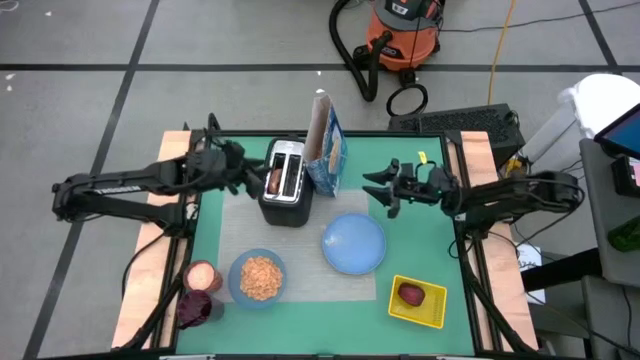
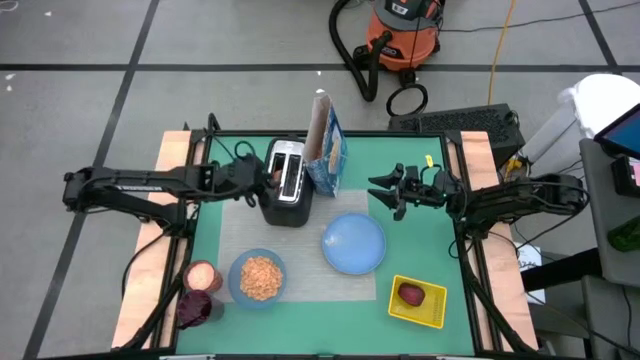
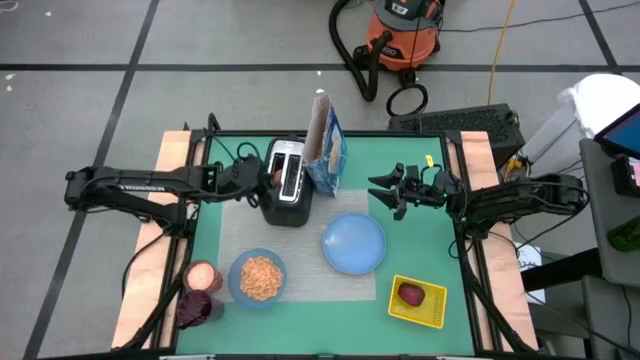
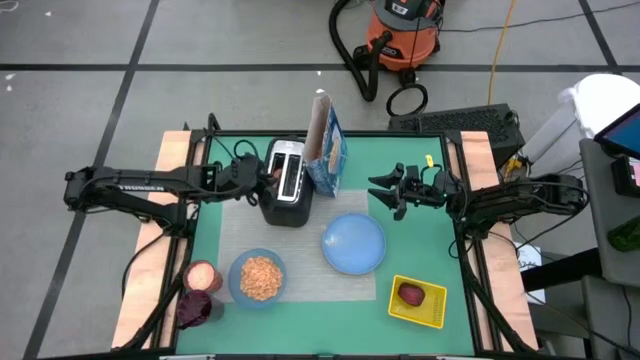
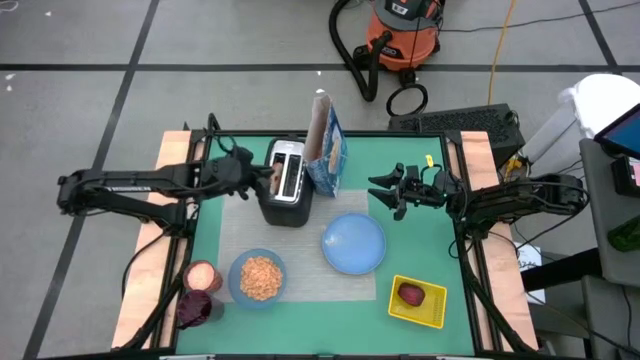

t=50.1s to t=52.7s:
Task: Arrange a breakfast setting
Put the toasted bagel on the blue plate

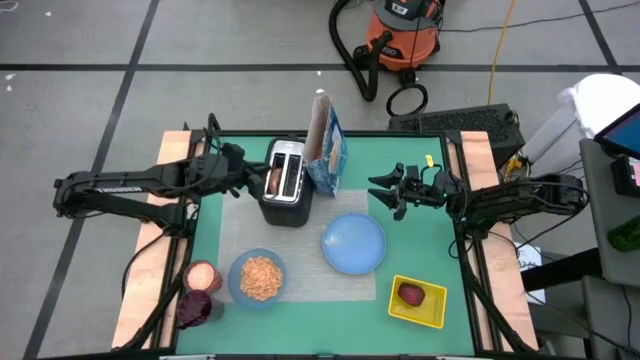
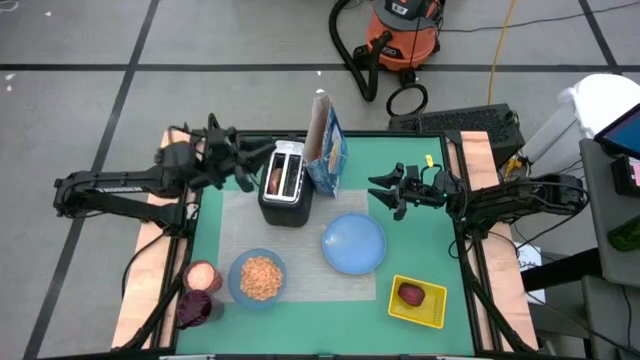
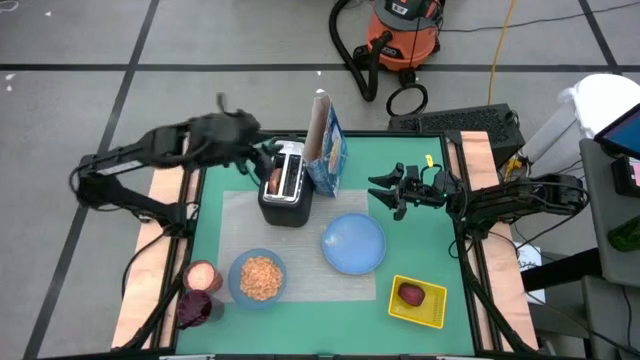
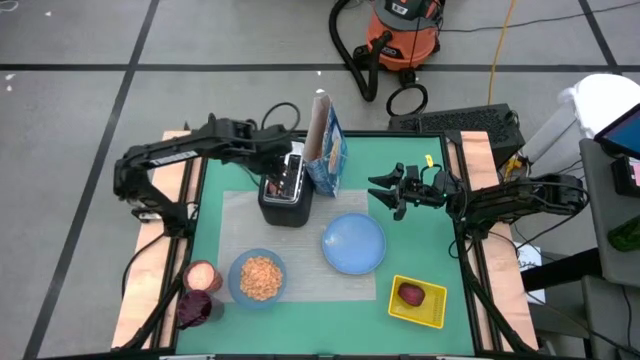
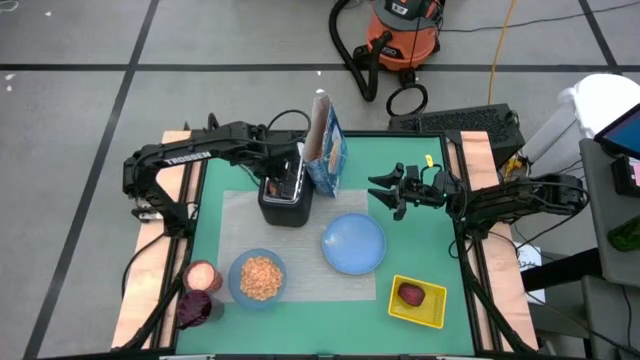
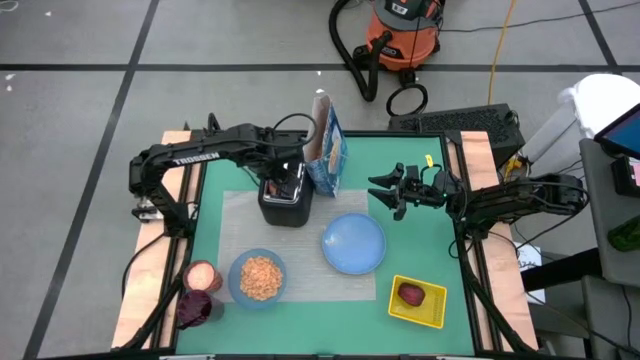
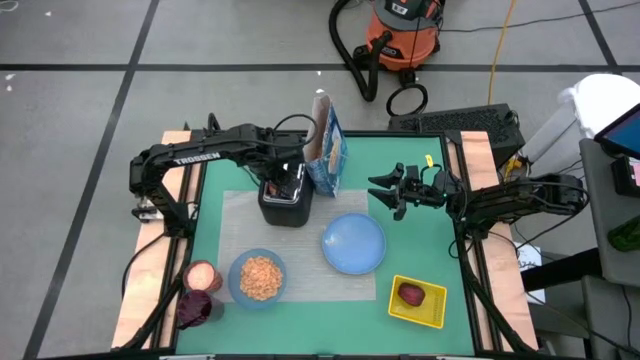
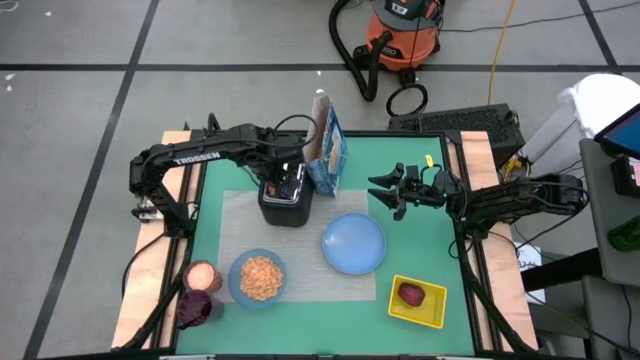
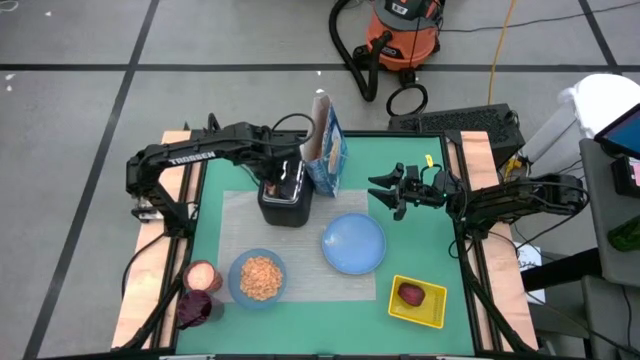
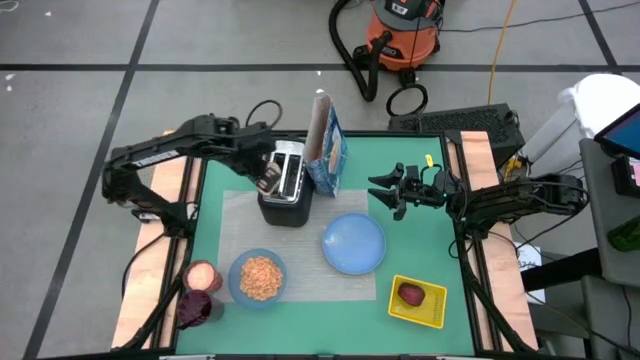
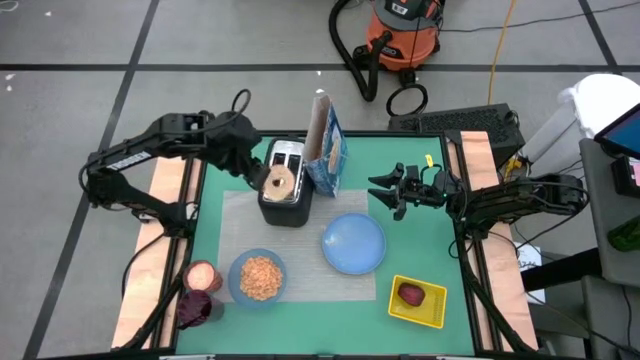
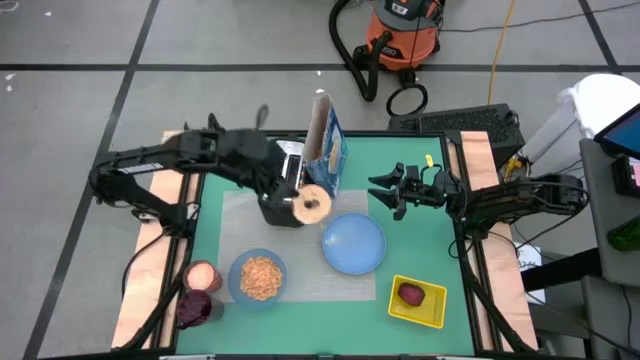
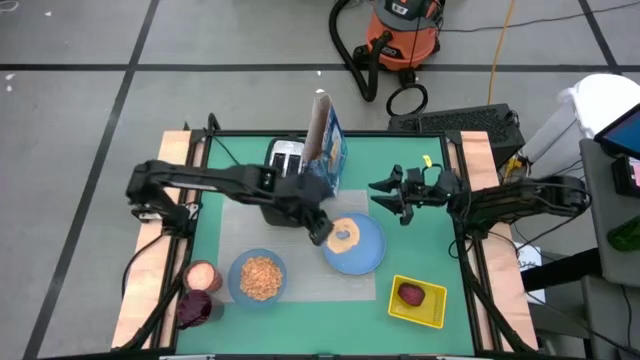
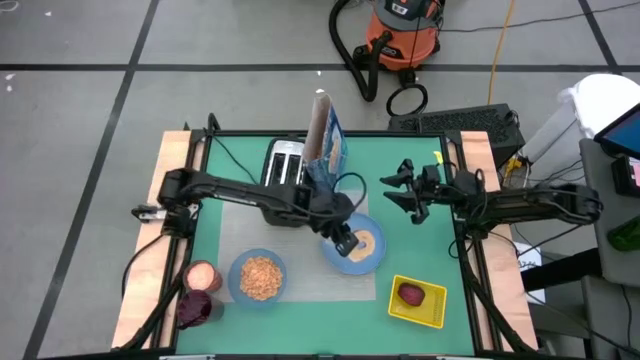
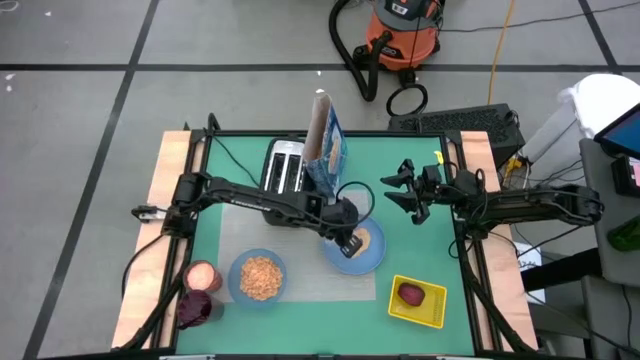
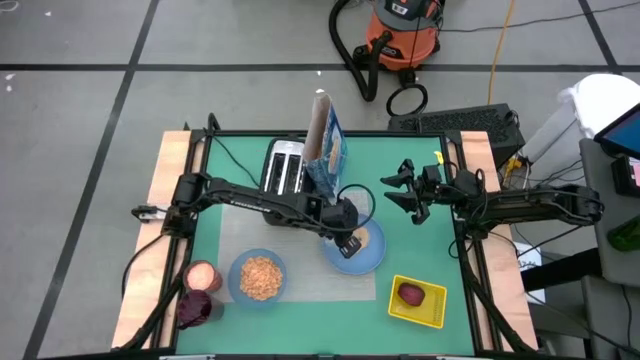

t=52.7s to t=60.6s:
Put the toasted bagel on the blue plate
